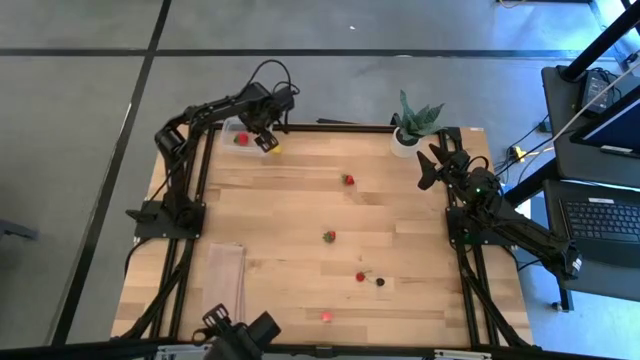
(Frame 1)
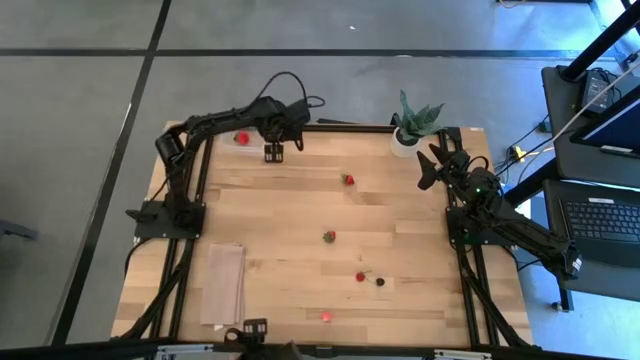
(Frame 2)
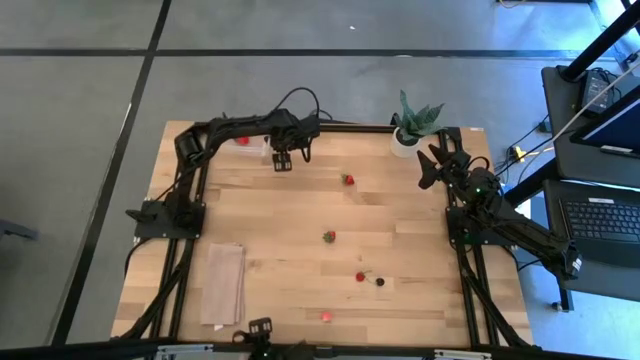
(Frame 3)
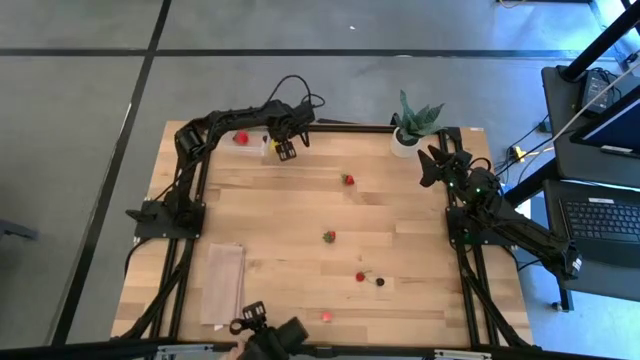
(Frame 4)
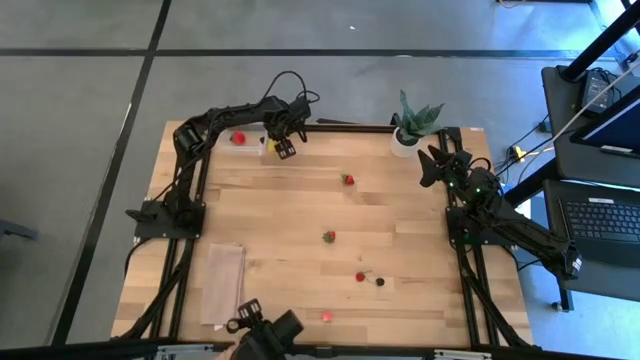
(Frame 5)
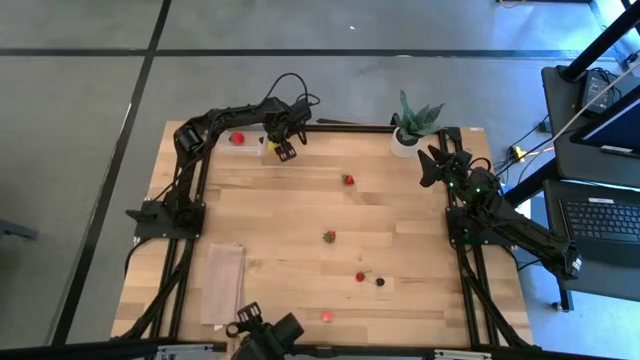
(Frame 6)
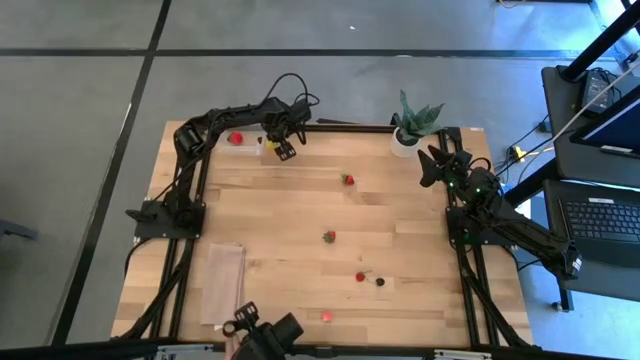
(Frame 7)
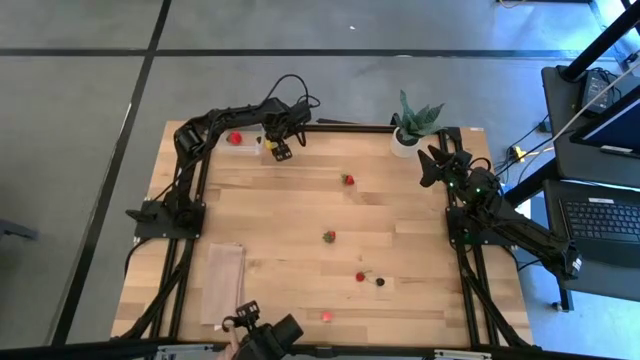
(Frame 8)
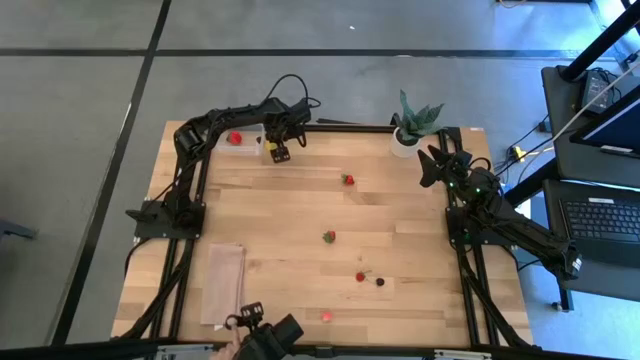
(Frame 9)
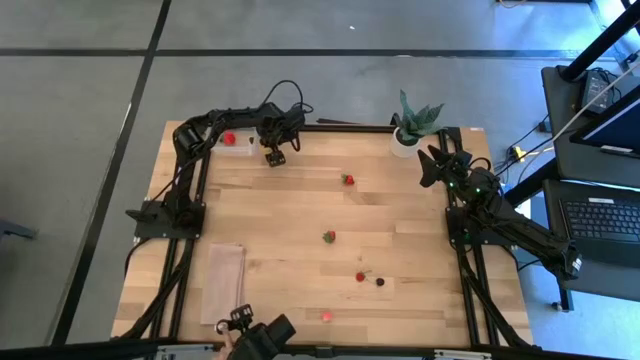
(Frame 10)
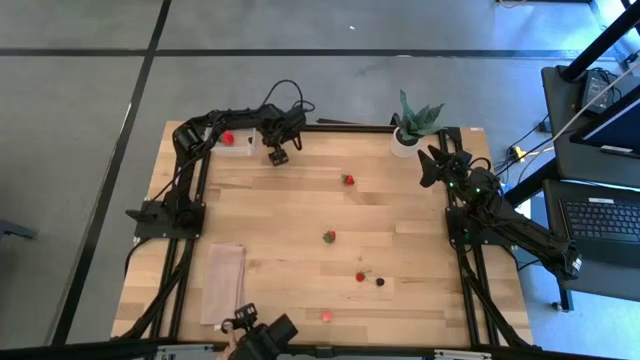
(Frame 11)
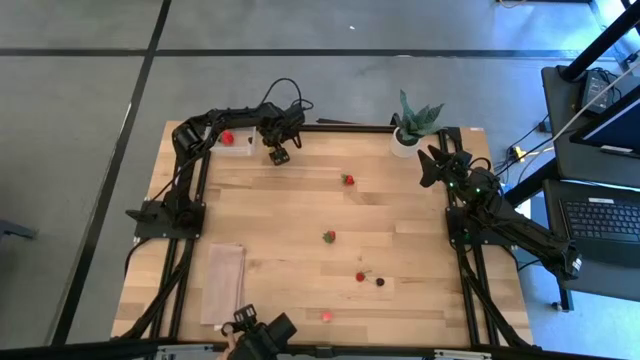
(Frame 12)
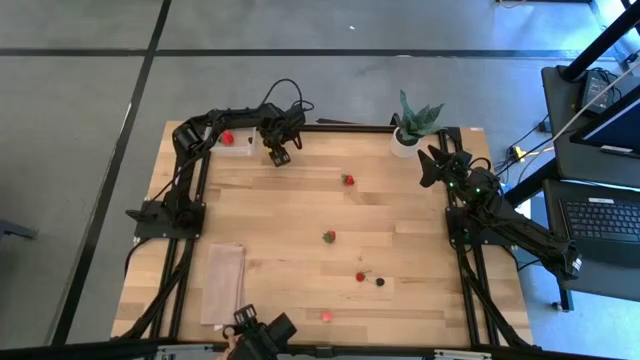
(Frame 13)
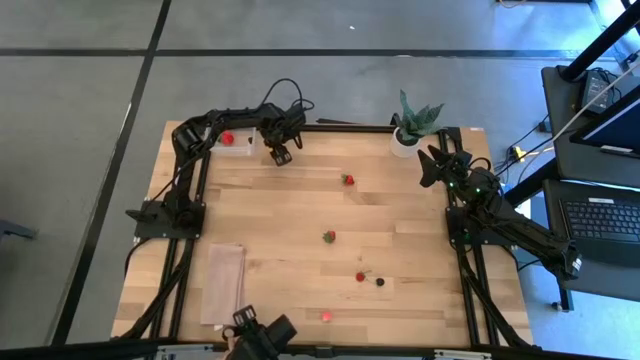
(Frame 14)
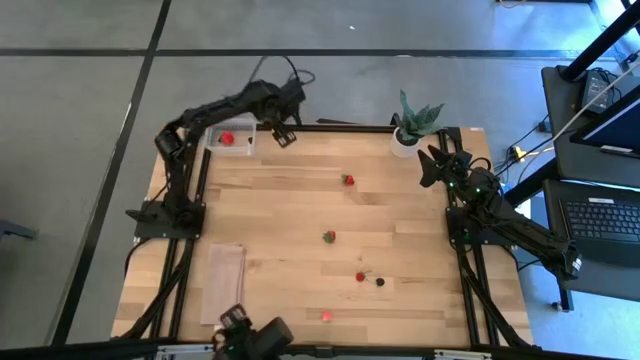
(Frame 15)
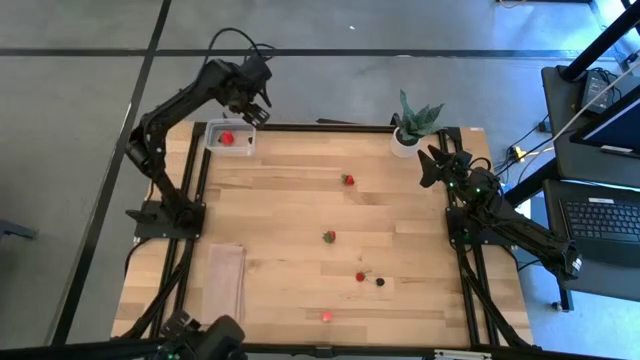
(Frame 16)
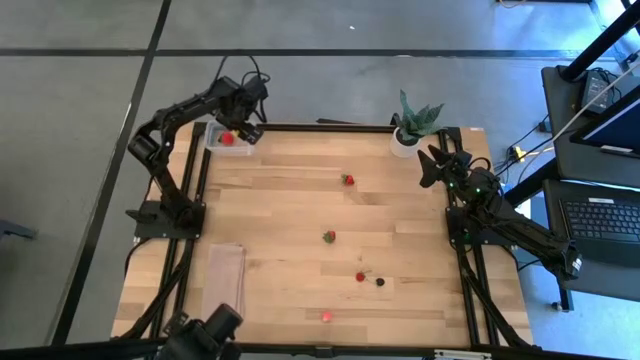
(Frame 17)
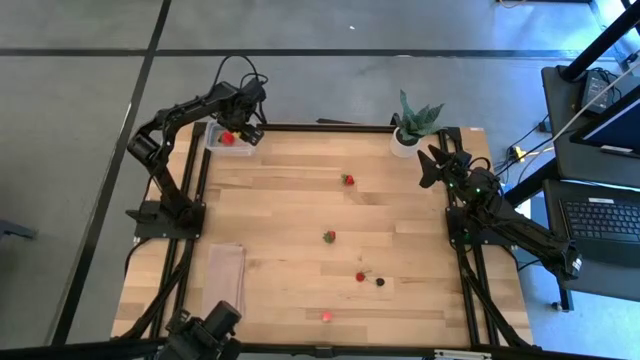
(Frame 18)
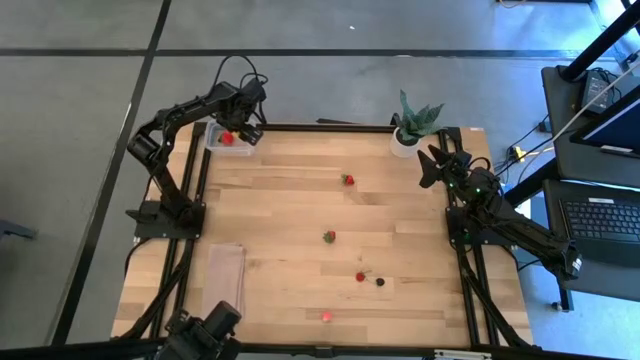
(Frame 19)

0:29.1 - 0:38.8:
Task: Pick and placing Produce into tupperware
Put the yellow lemon into the transparent container

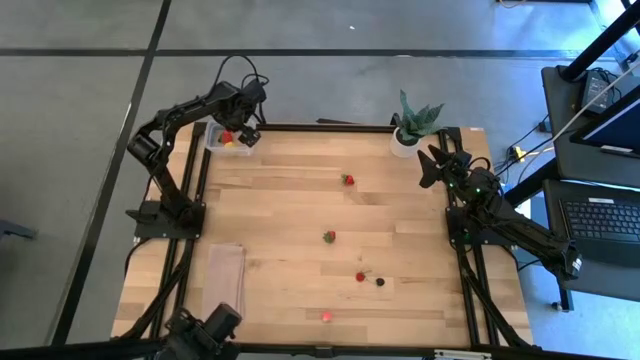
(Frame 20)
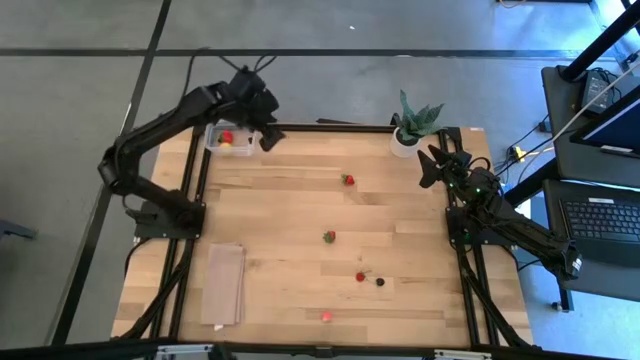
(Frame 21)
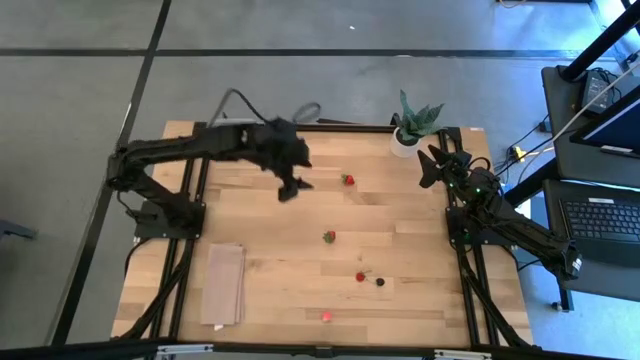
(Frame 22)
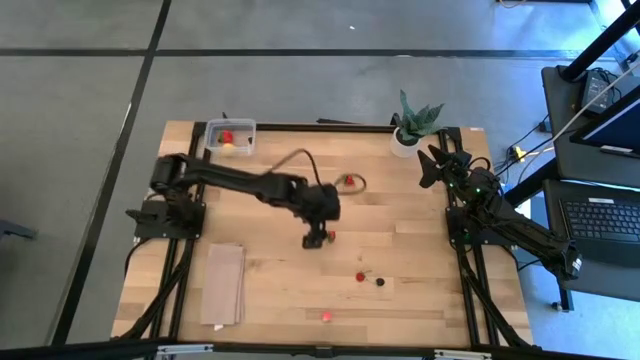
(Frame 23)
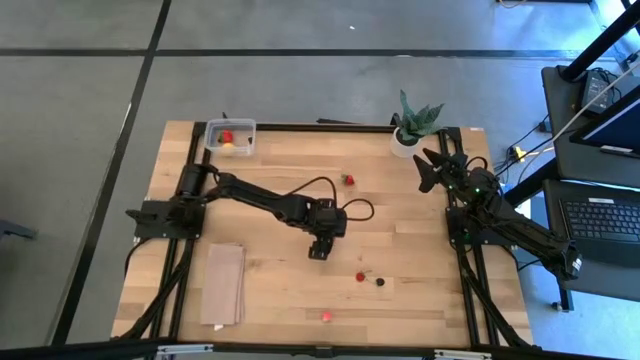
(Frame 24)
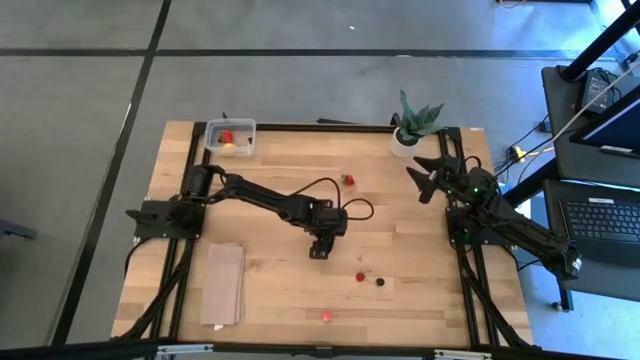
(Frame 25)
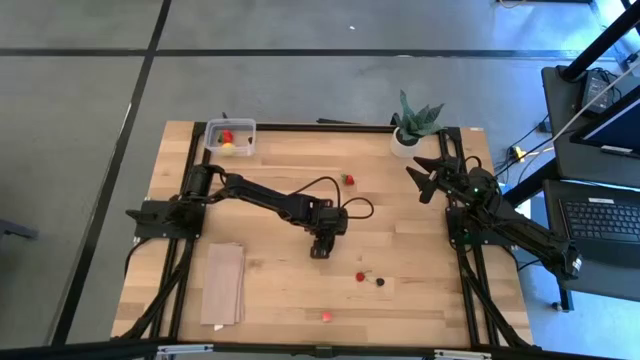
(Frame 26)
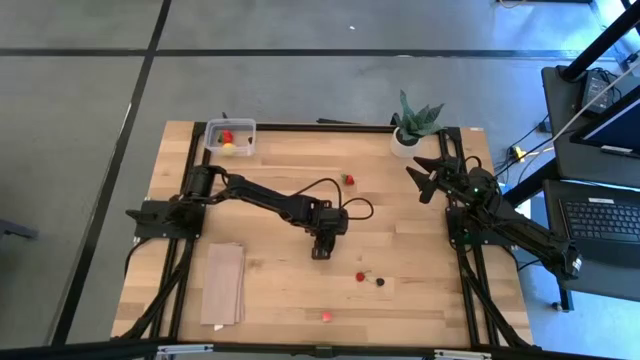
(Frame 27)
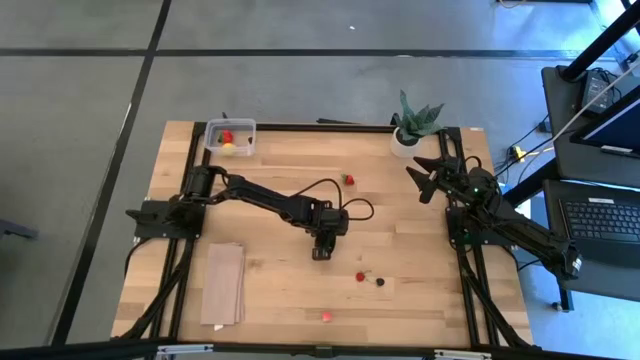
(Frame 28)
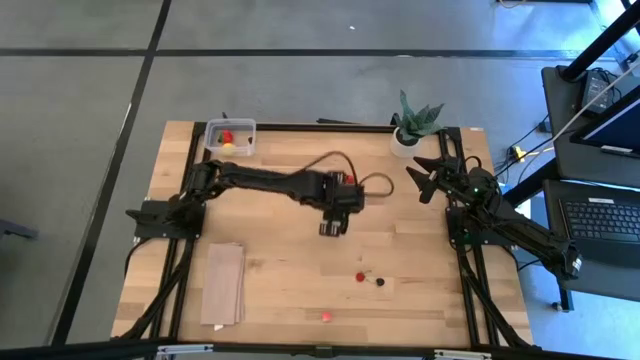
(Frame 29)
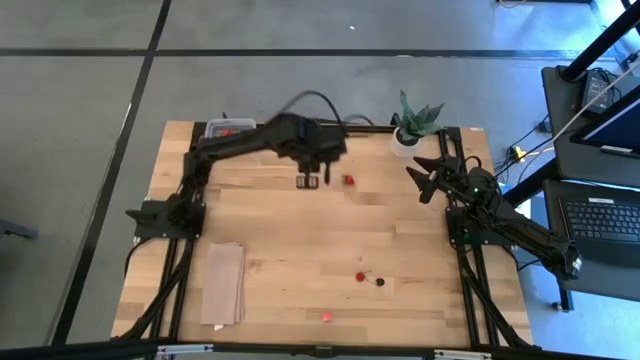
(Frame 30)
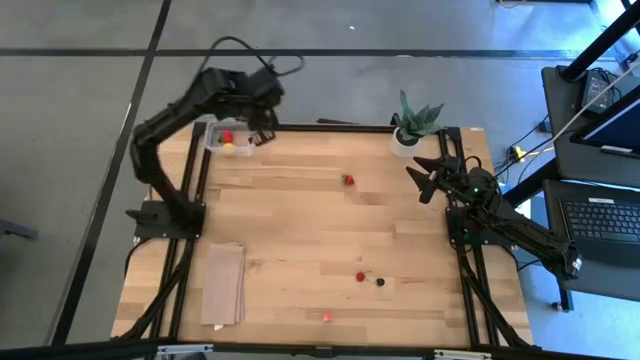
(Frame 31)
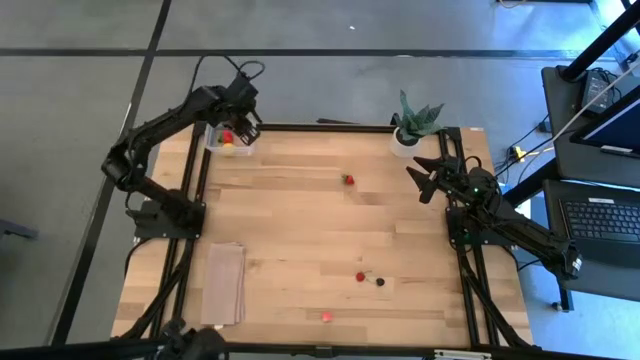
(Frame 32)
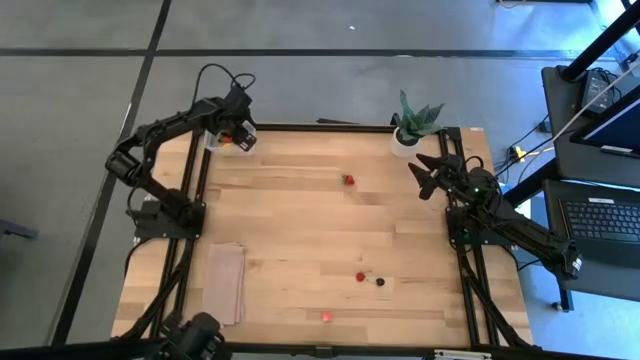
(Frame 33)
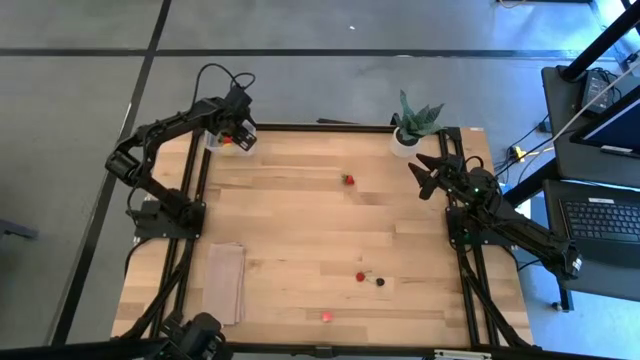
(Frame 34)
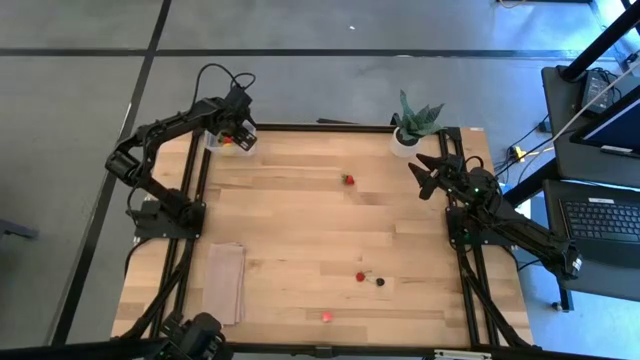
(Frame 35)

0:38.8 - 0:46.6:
Put the red strawberry into the transparent container

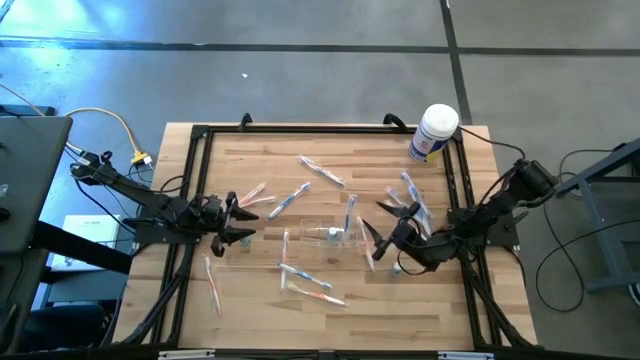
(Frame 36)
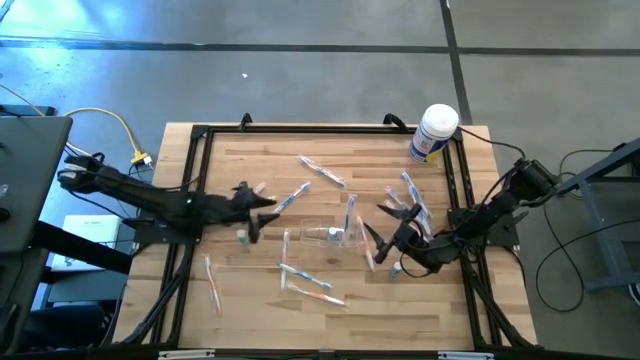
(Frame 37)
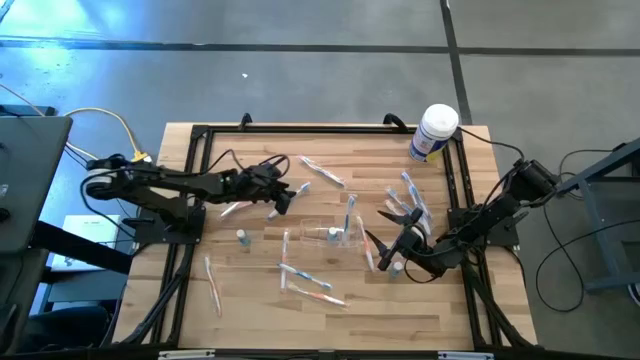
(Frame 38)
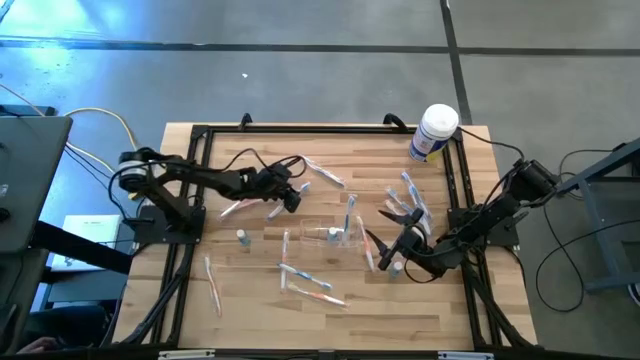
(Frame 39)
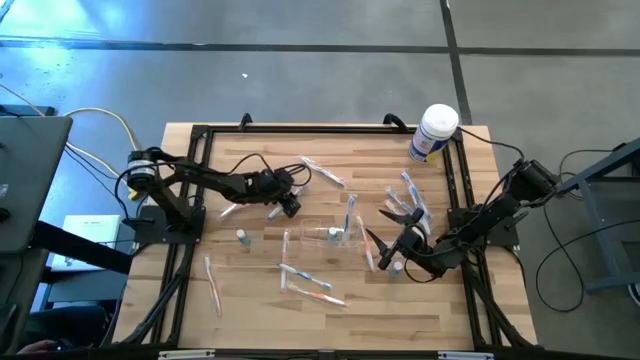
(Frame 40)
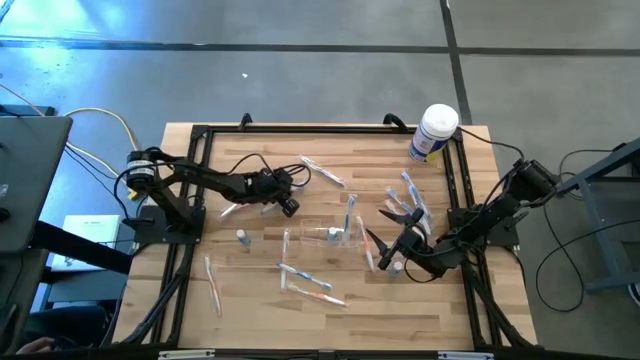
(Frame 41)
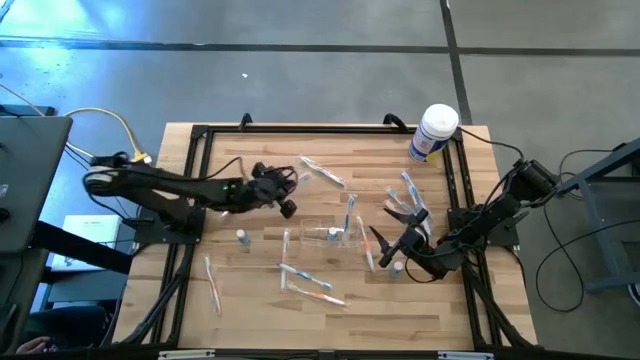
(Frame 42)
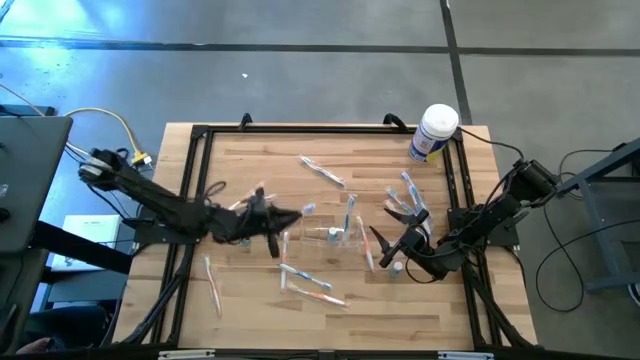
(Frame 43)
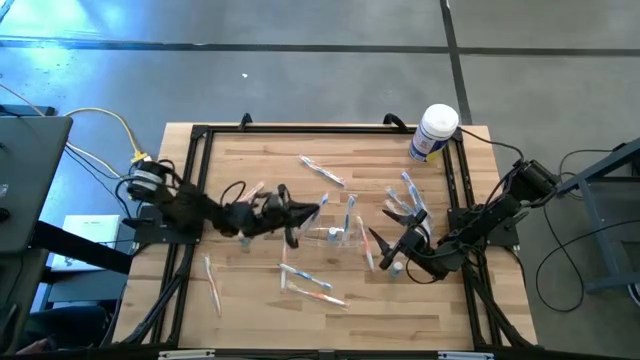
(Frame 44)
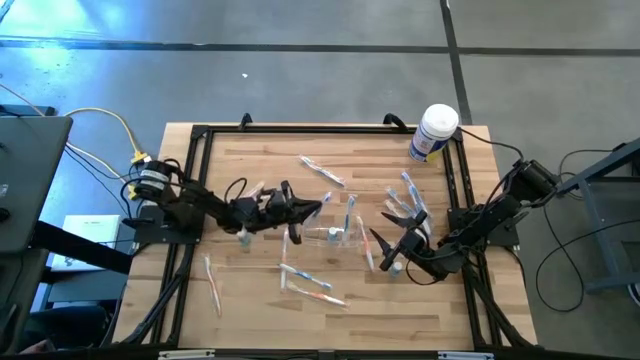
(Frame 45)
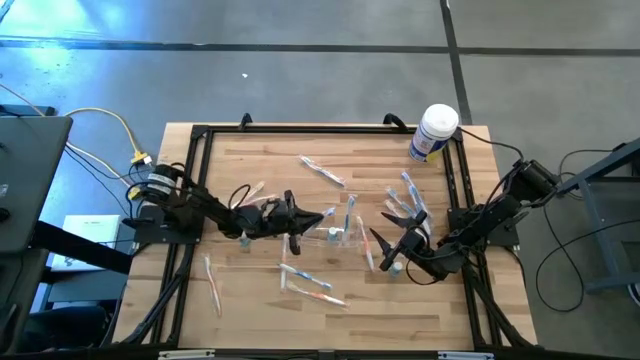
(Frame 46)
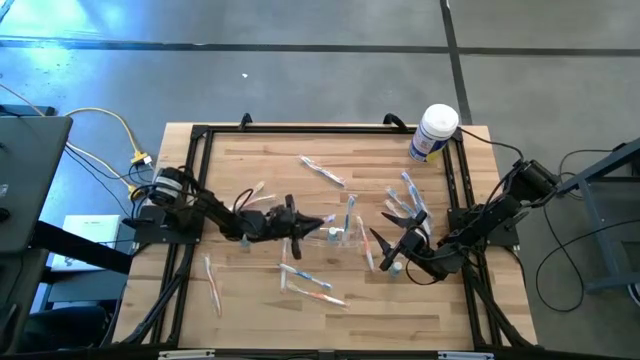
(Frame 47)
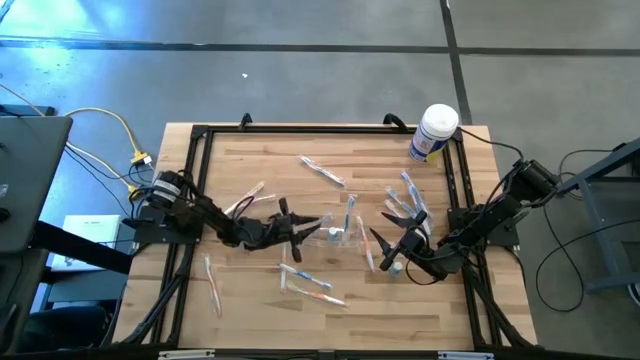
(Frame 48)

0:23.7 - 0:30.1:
Task: Pick & Place toothbrushing station
Put the blue toothbrush into the transparent organizer
